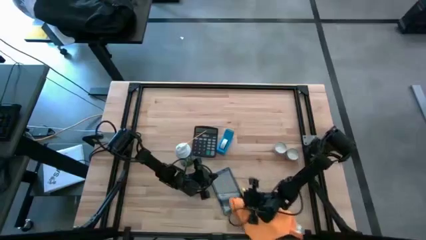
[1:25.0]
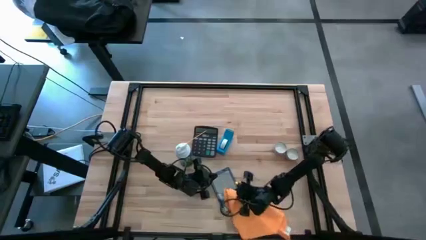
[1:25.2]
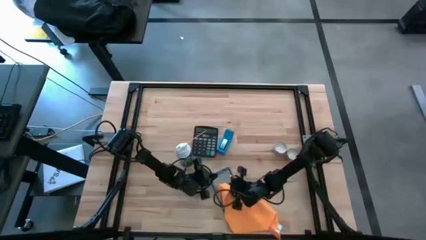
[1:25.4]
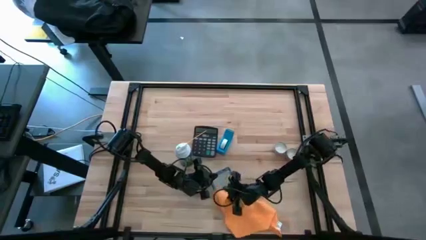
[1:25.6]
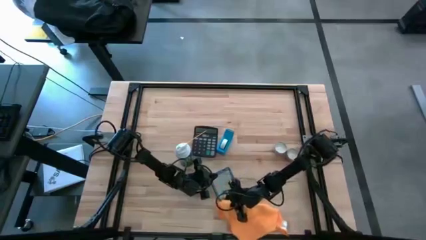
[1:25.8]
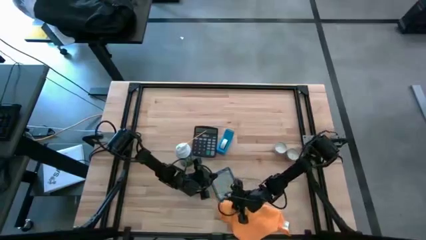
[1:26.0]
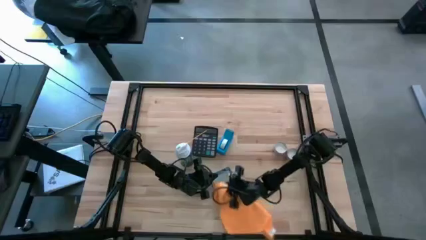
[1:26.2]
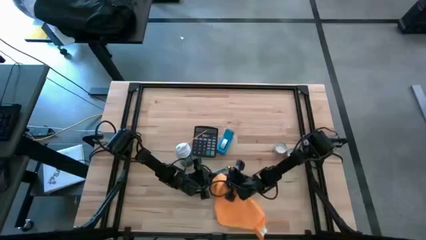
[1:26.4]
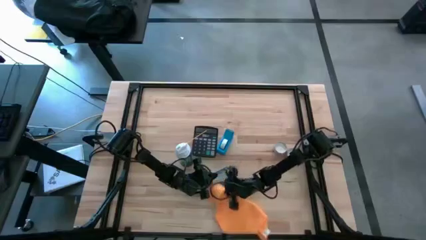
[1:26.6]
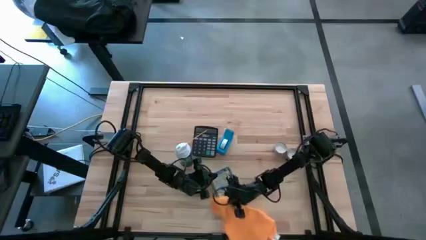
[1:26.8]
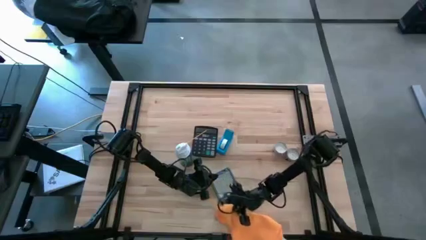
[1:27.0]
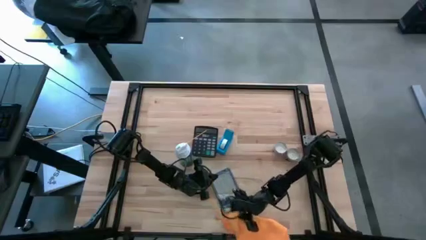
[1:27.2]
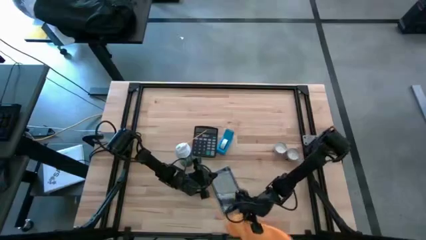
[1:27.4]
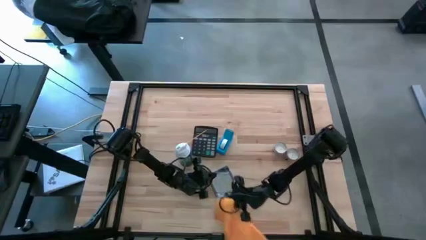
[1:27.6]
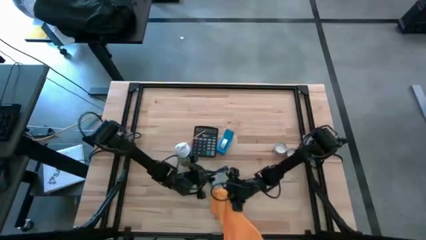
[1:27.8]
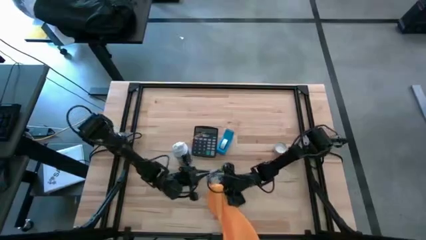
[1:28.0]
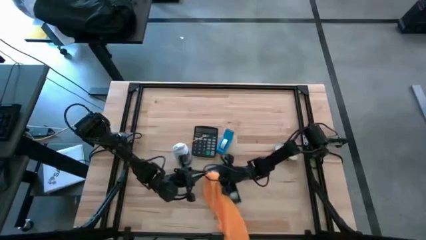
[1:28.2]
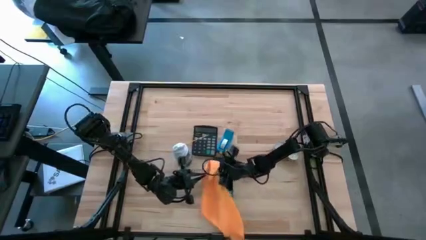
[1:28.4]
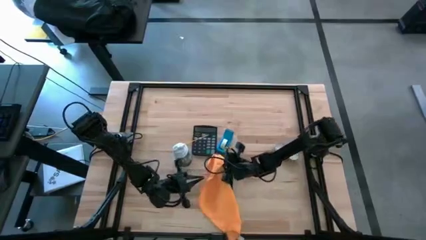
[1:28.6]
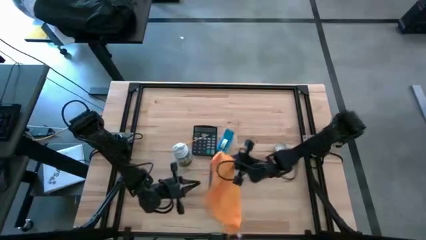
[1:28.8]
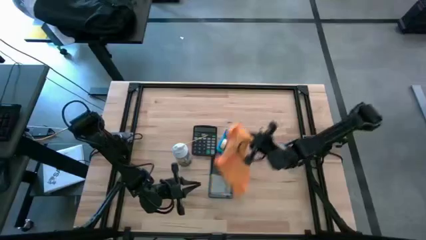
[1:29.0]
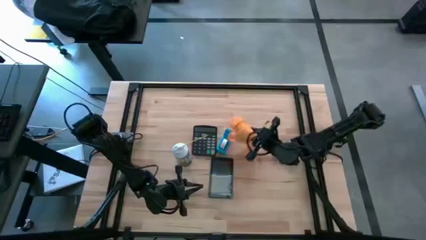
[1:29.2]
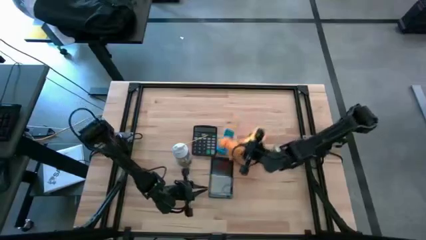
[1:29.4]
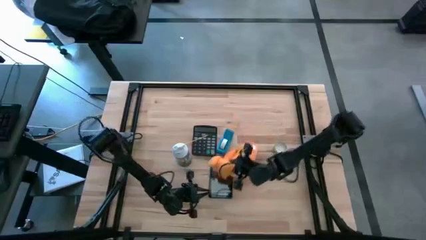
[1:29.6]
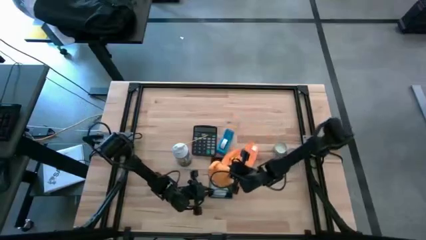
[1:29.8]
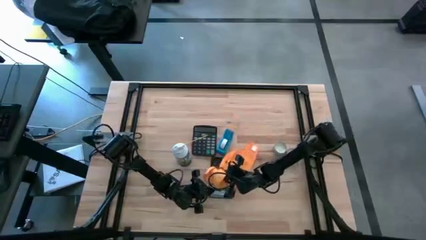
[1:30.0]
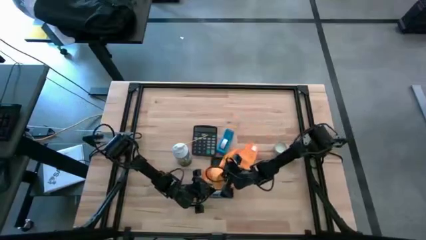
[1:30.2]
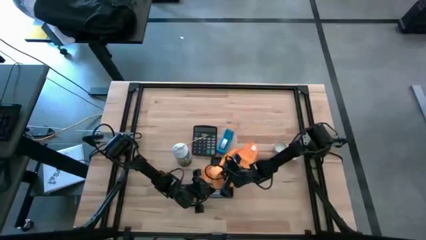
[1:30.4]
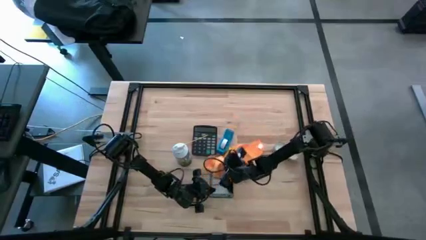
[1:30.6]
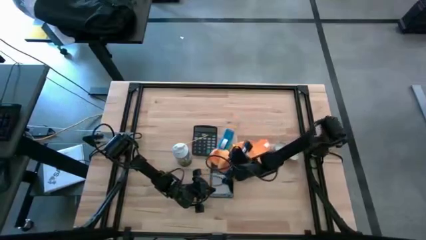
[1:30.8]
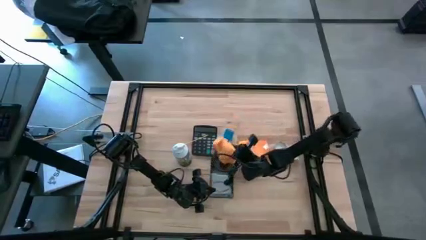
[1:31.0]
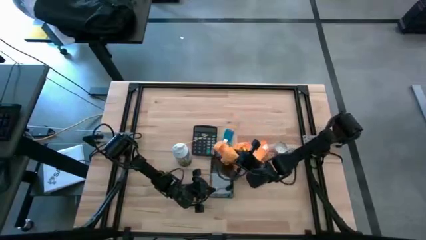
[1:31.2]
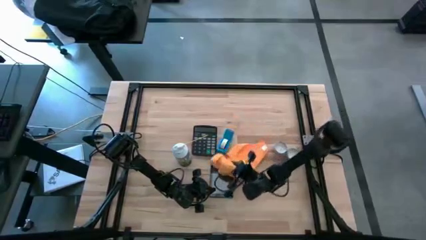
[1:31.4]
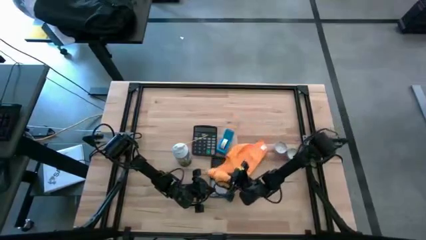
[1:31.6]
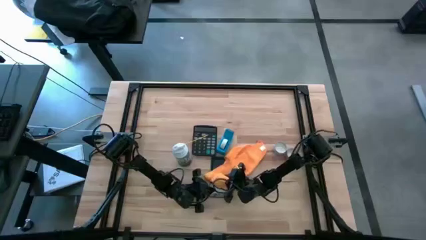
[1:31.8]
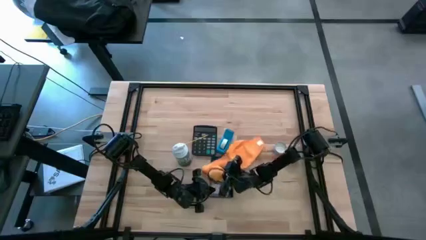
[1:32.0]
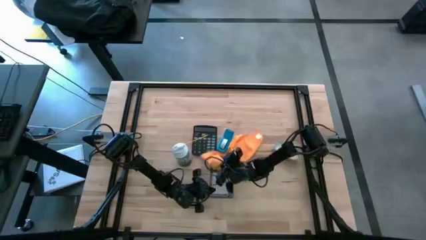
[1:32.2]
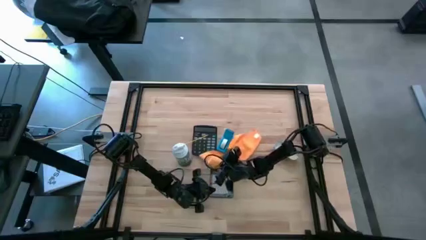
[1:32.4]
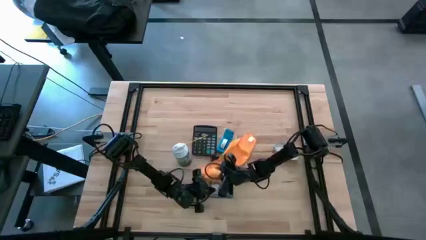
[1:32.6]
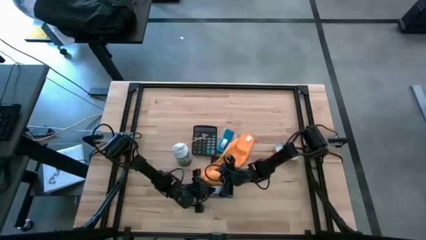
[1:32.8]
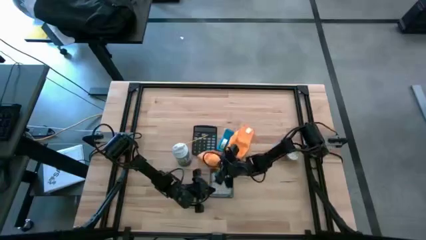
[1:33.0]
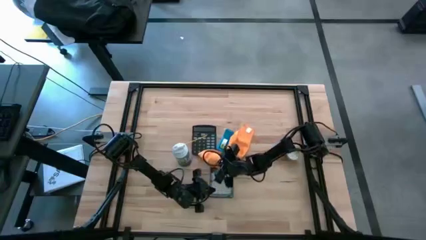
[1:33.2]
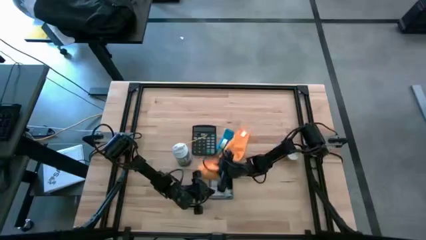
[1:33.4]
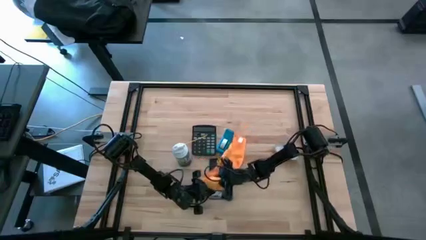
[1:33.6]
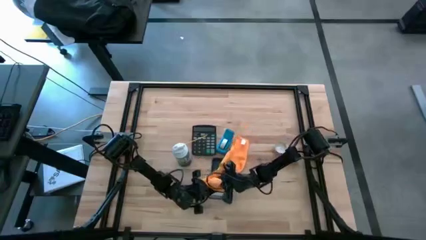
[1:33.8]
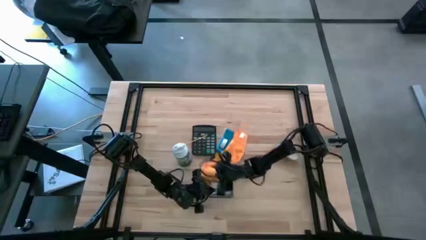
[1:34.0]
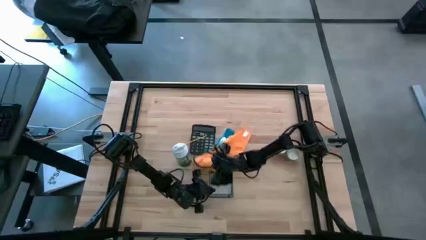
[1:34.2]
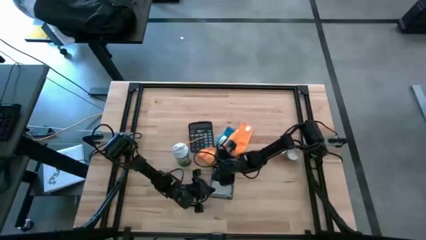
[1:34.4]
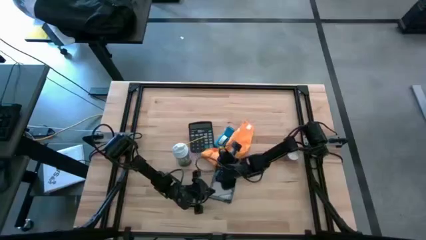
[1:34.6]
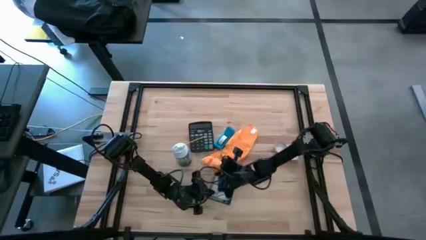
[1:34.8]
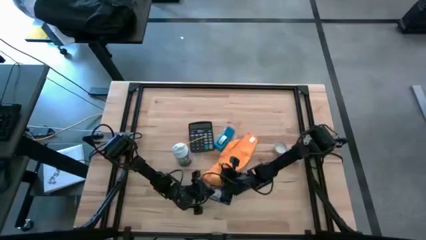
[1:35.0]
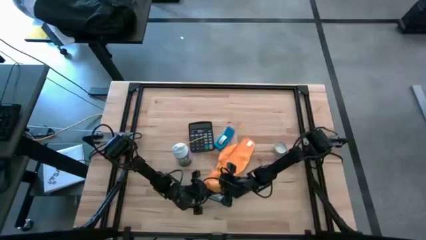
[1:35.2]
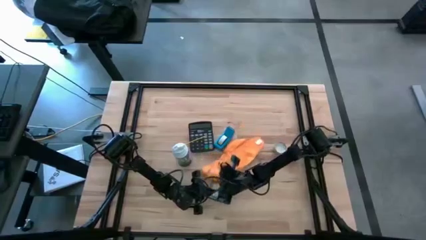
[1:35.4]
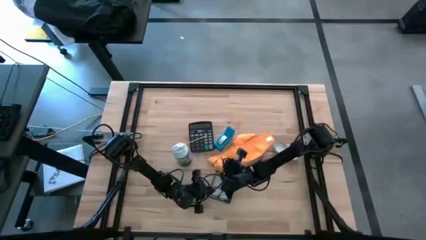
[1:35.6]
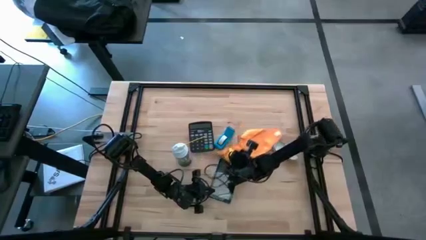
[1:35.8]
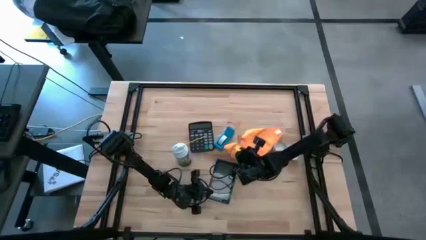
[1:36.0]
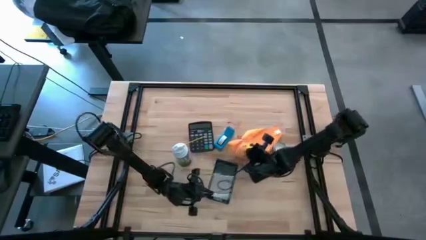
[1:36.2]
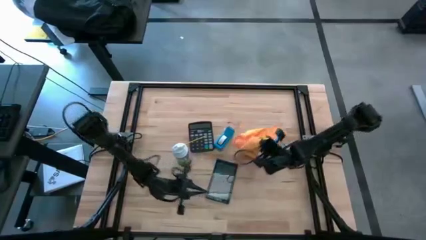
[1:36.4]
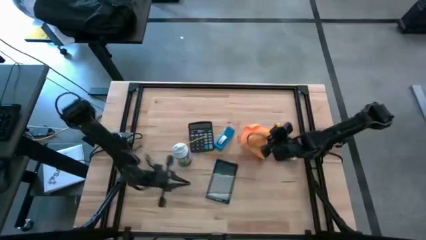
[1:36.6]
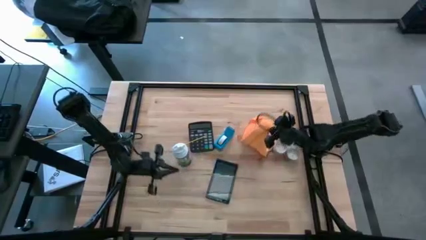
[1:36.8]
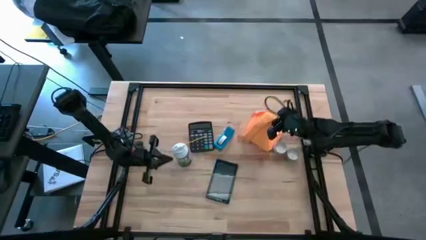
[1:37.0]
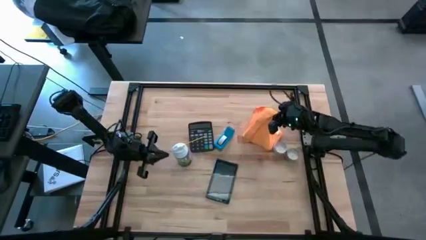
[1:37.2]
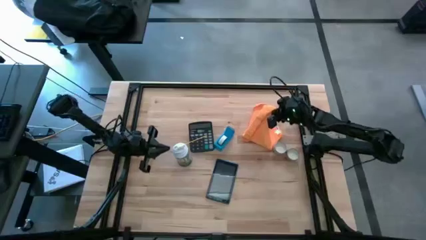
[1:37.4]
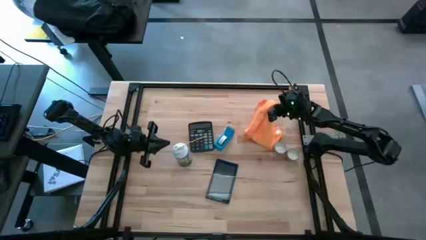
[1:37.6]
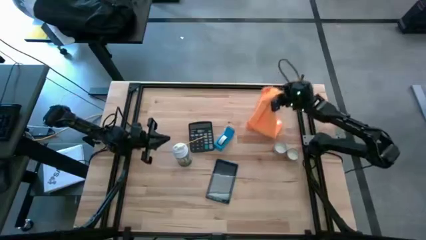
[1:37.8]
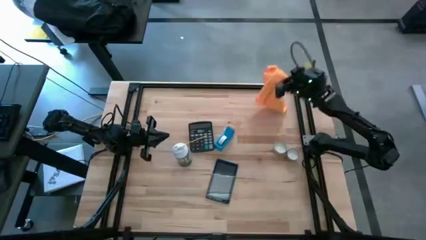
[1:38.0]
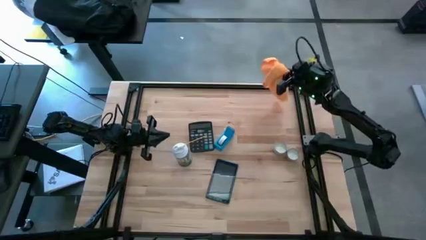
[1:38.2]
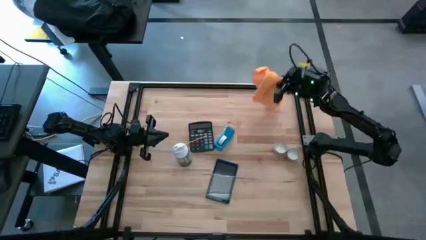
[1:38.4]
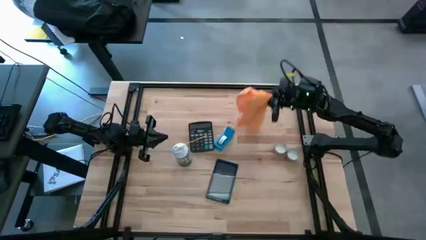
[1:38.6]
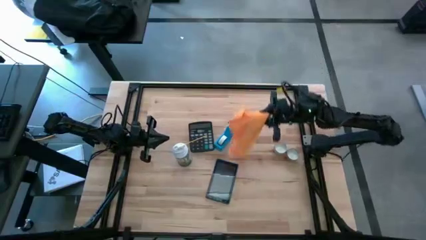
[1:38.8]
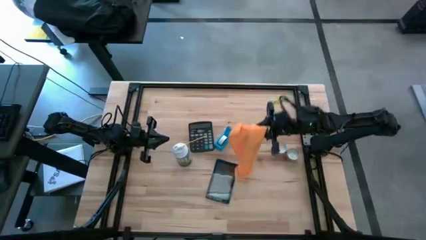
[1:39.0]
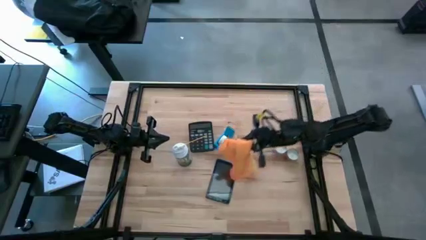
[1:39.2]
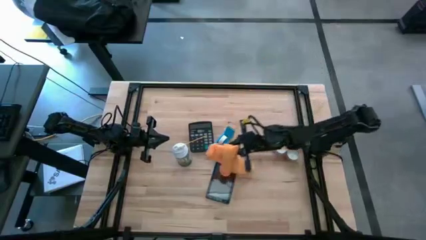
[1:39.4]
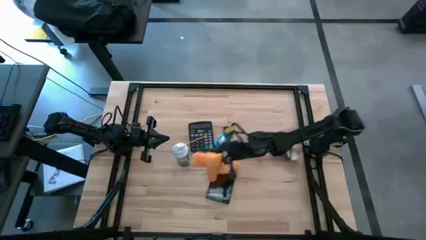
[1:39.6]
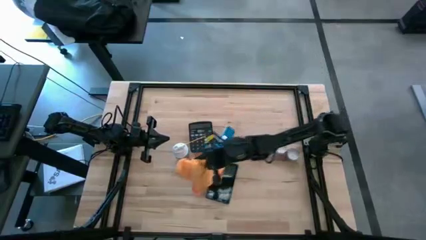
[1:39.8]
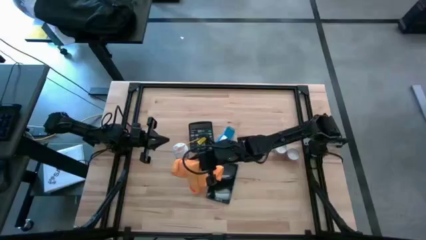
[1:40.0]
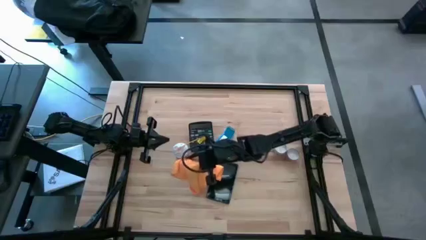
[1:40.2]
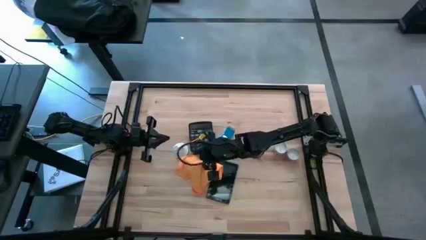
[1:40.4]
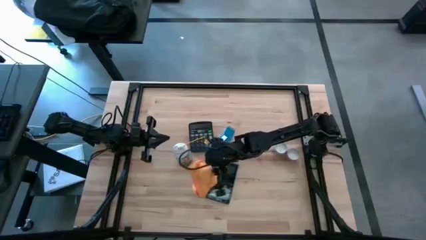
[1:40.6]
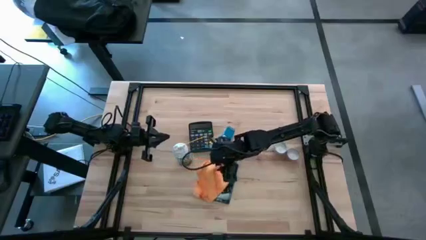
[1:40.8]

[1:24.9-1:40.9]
Task: Apply microfiber cloth
Wipe the tablet with the orange microfiber cloth
